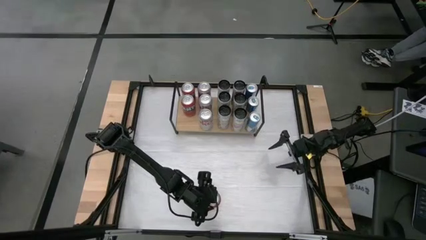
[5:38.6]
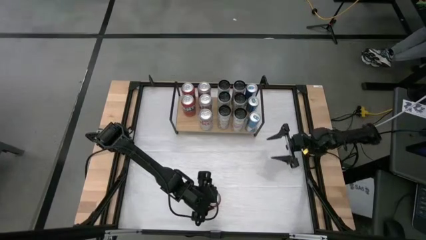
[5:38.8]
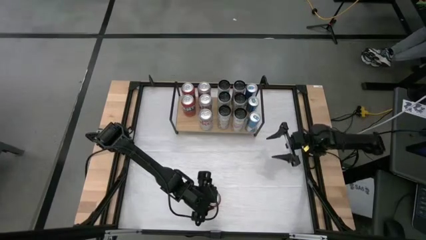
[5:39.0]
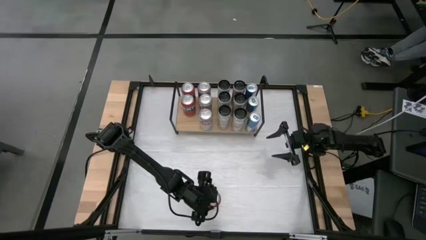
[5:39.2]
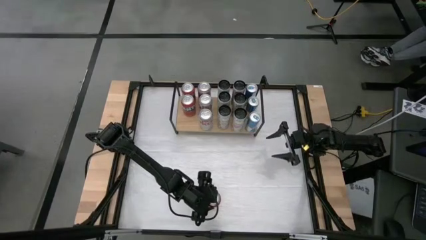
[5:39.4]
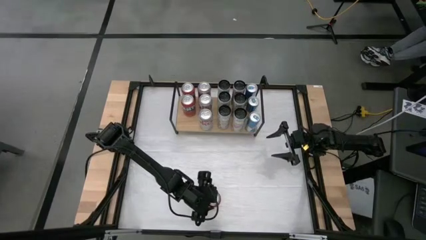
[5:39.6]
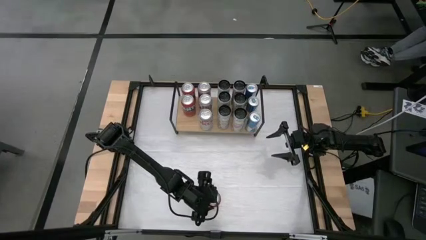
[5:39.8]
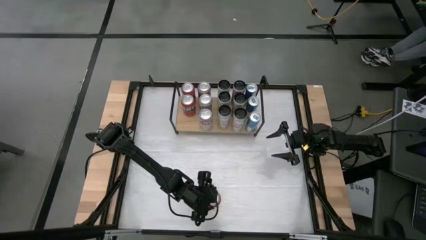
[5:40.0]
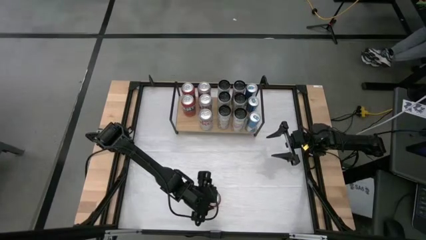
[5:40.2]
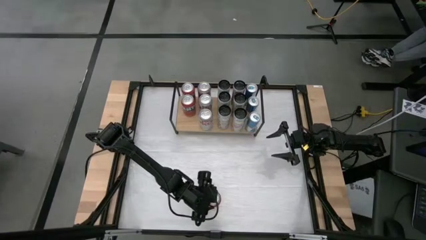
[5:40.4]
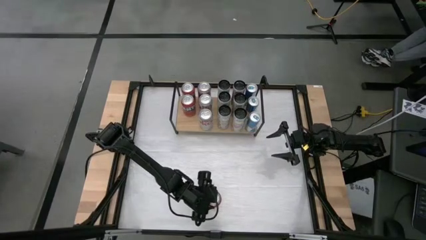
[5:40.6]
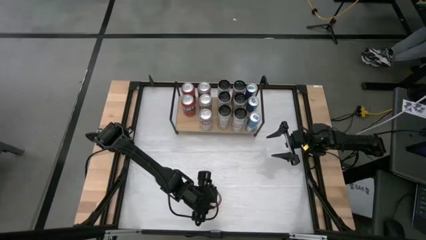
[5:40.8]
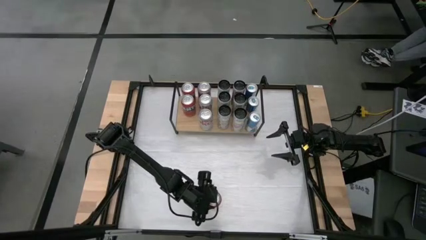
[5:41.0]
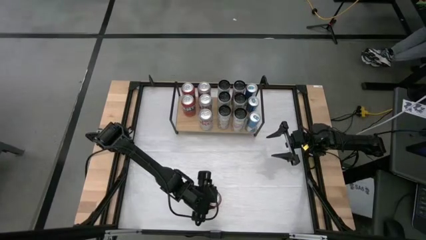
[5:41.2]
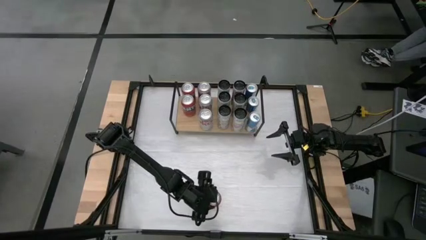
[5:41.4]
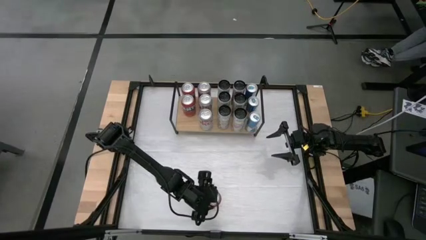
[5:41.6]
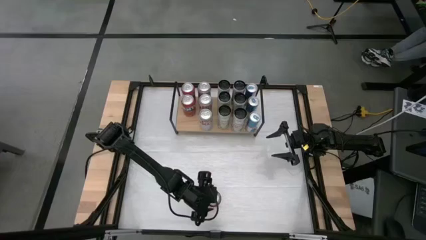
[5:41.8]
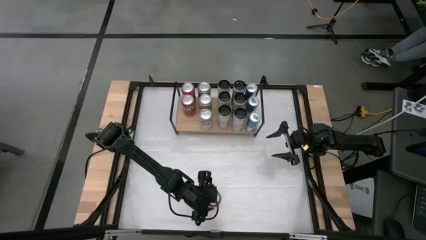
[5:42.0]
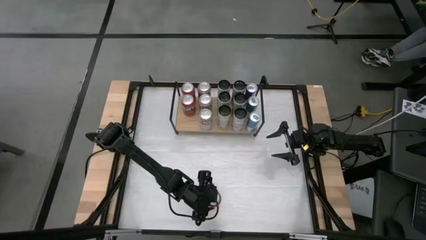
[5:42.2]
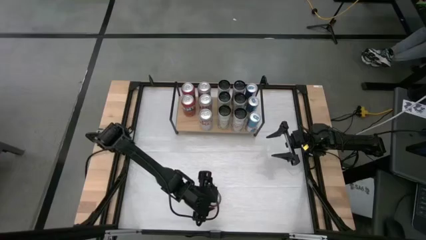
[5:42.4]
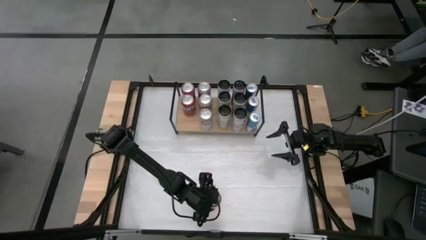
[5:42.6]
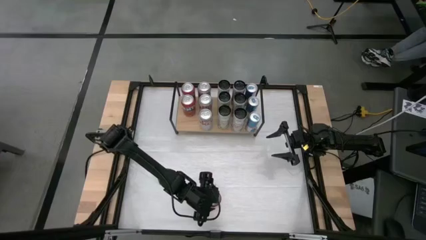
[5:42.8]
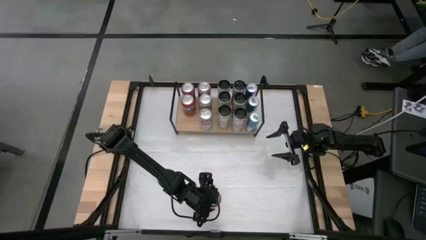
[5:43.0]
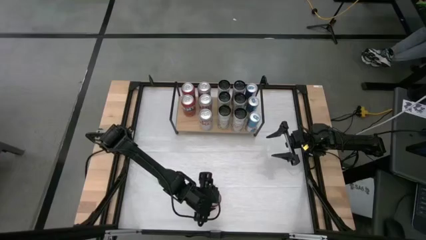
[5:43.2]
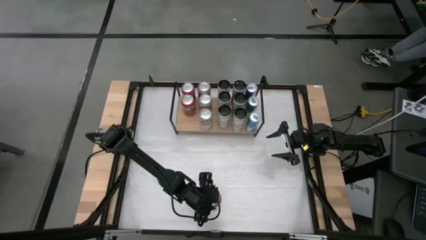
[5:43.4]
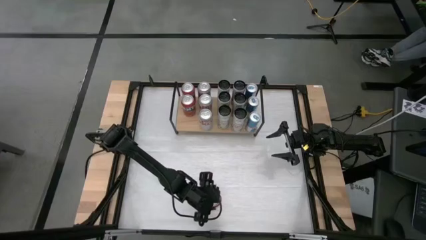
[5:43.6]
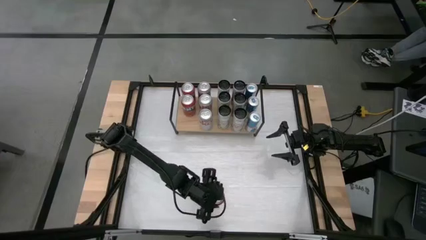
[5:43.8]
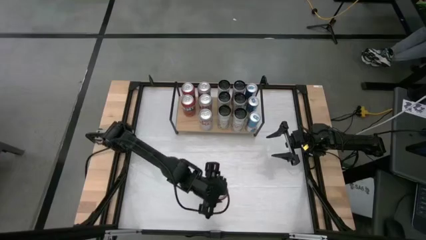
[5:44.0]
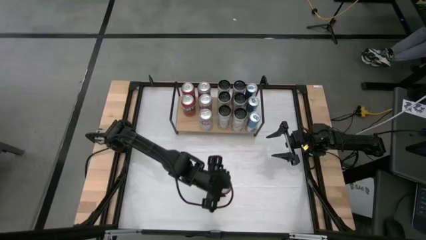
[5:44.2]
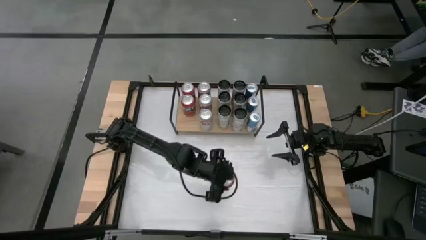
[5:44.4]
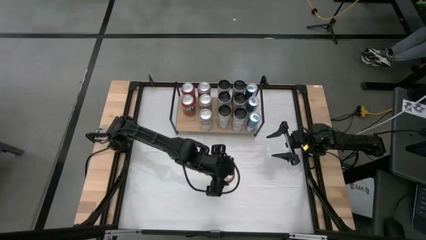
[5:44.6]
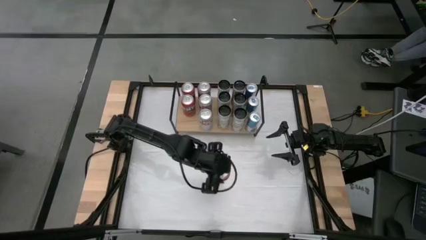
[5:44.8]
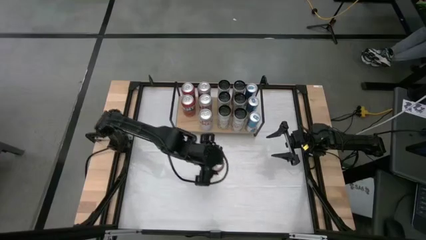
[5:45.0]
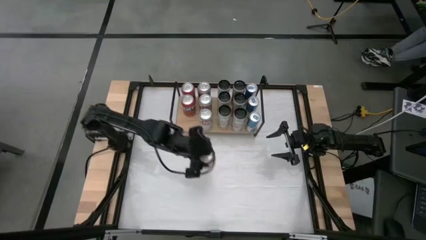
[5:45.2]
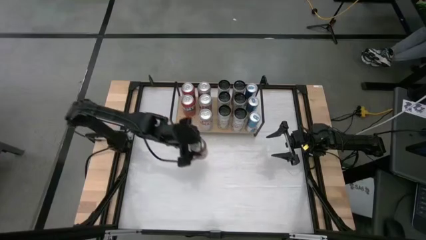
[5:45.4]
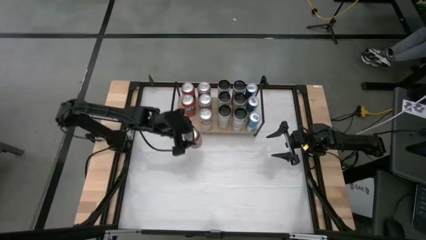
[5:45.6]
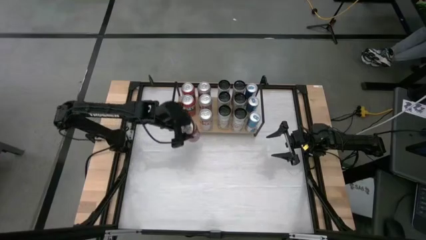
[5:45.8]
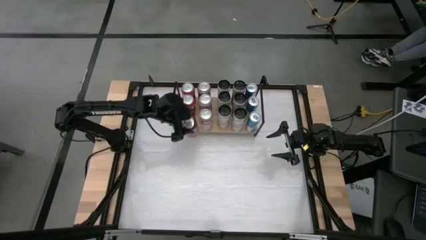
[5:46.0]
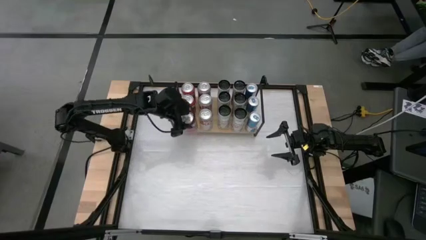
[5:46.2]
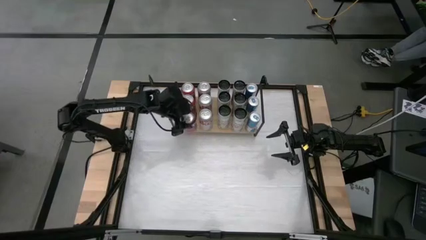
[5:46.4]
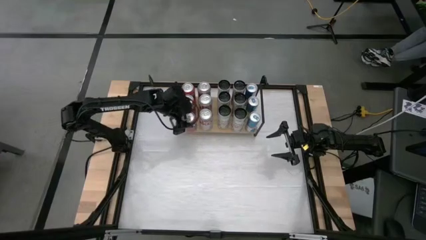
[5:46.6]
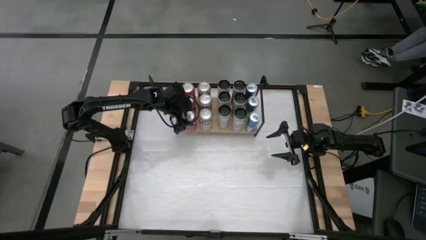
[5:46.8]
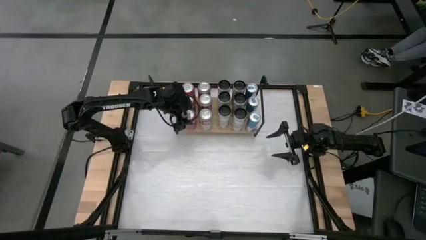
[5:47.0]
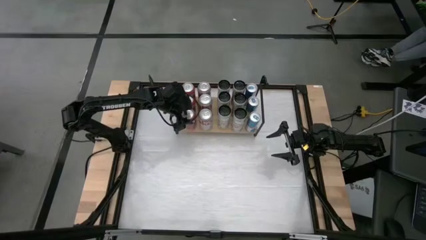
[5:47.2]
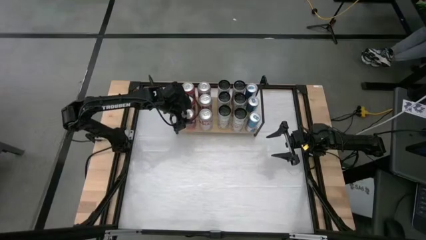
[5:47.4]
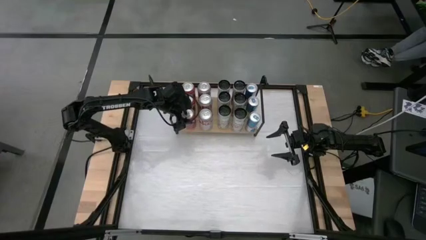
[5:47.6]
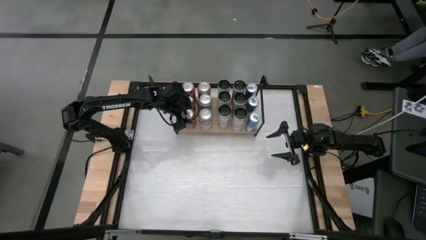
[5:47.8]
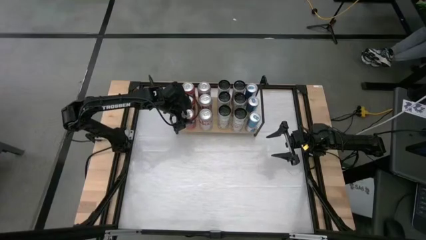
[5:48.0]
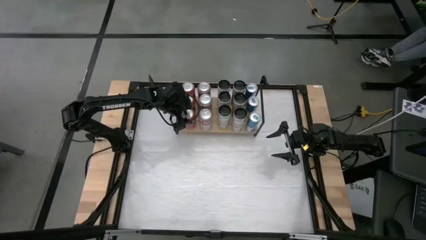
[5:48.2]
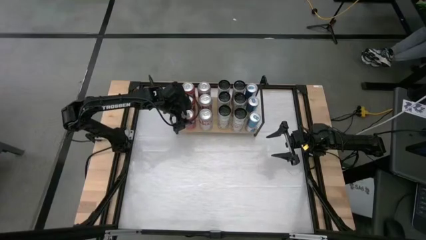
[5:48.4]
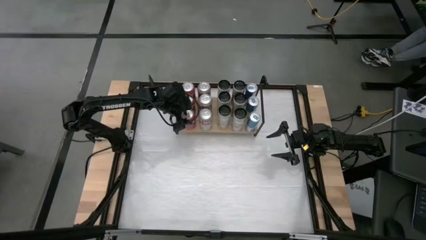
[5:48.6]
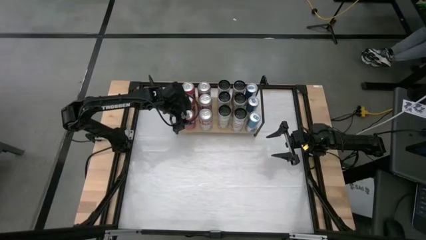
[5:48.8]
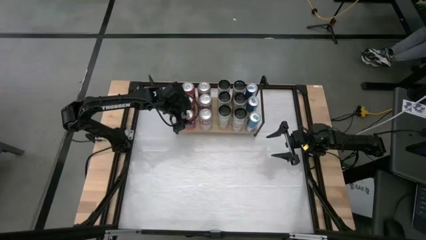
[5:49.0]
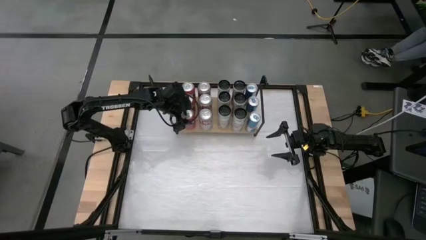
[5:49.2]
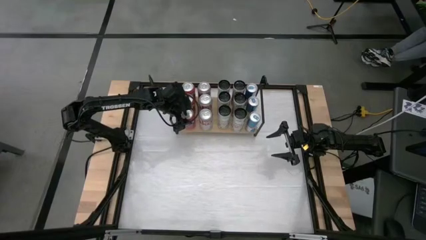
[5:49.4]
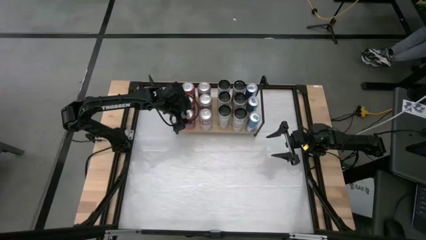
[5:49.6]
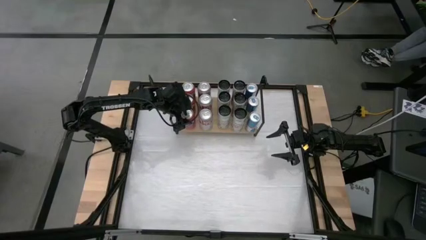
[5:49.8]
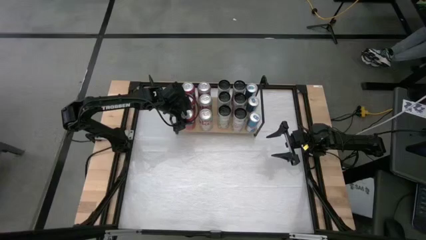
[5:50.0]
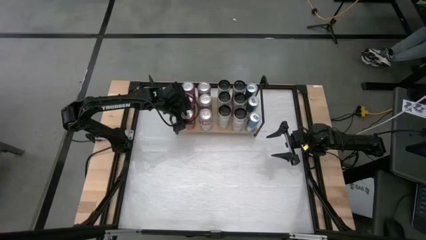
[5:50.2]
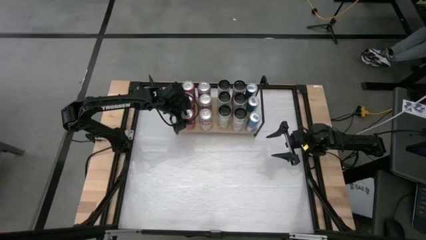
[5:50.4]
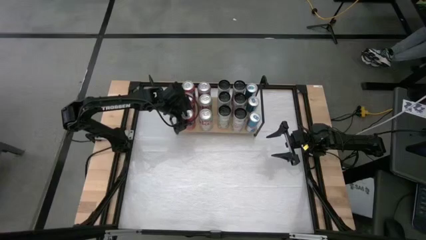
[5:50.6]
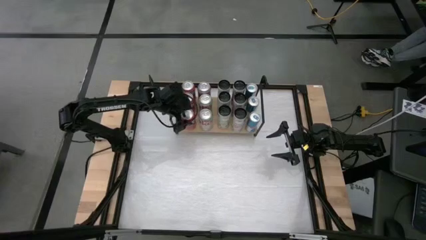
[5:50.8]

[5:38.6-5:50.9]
Task: Place canned beverage on shelf
Put the red soda can onto the shelf aligned with the other red soda cans

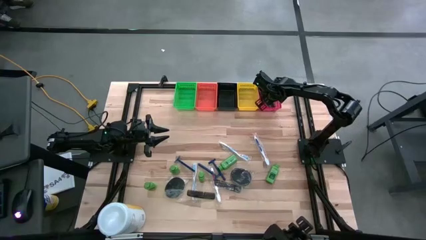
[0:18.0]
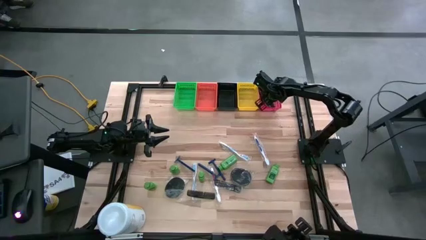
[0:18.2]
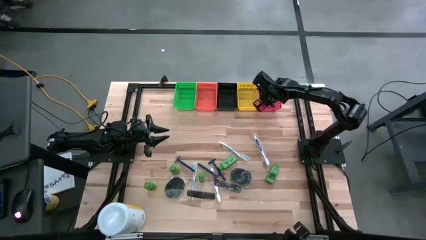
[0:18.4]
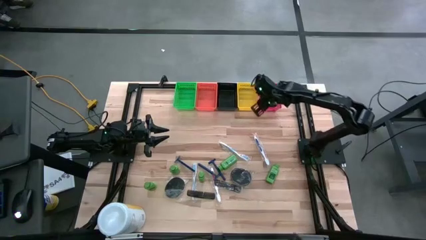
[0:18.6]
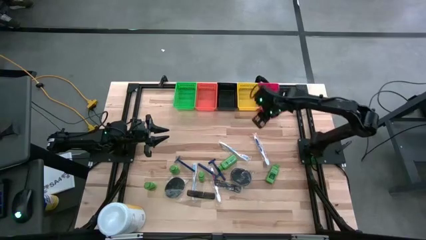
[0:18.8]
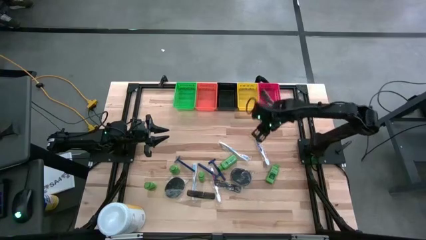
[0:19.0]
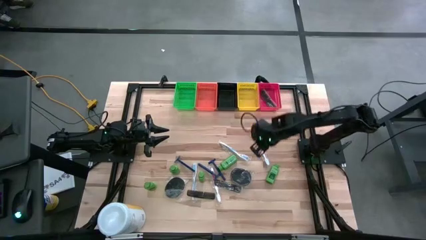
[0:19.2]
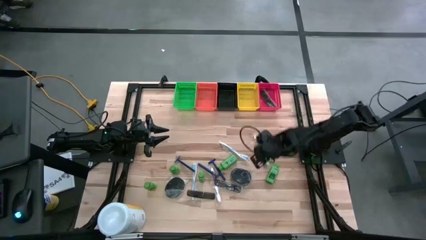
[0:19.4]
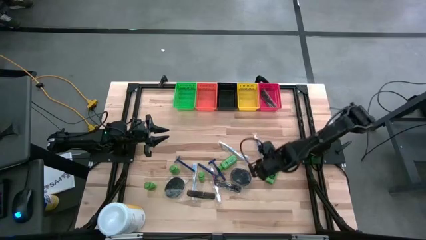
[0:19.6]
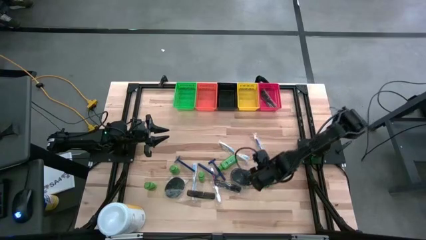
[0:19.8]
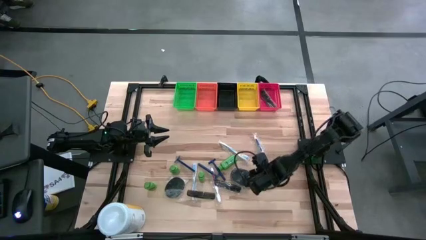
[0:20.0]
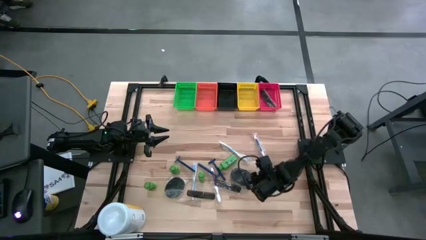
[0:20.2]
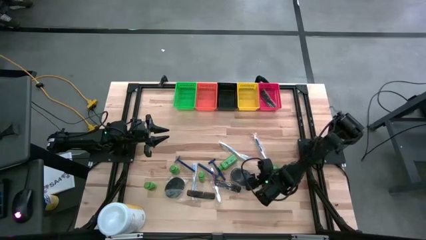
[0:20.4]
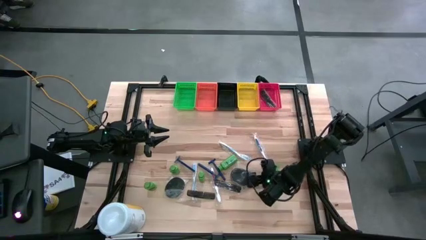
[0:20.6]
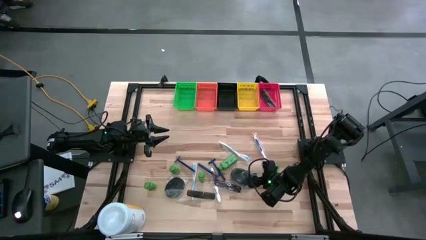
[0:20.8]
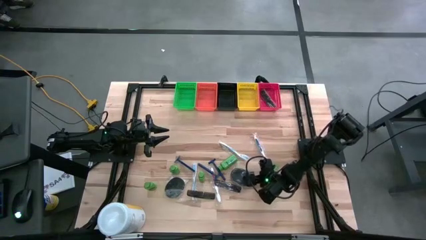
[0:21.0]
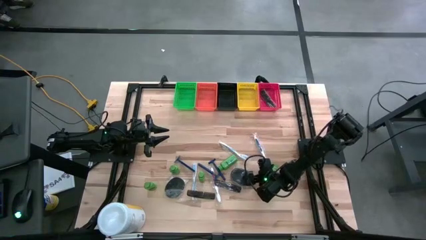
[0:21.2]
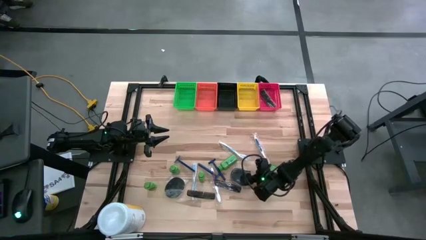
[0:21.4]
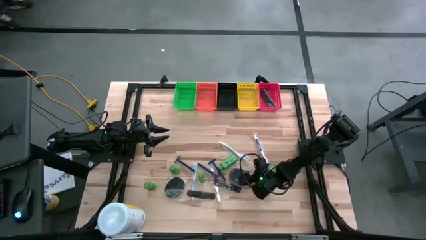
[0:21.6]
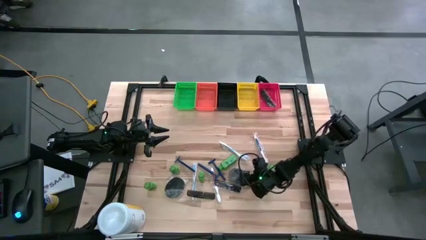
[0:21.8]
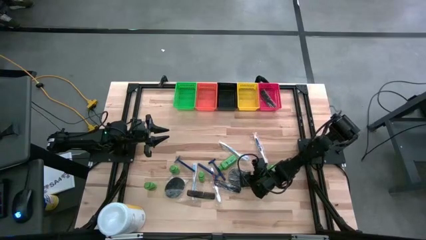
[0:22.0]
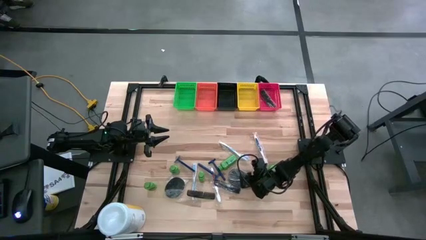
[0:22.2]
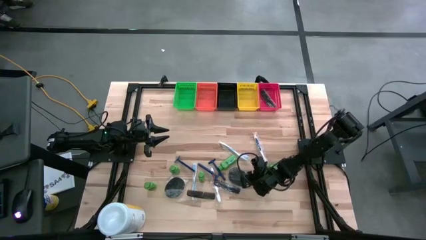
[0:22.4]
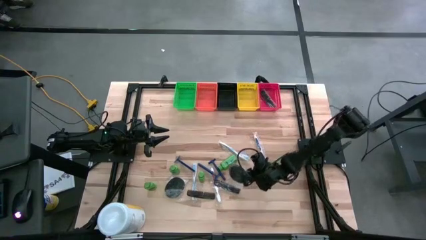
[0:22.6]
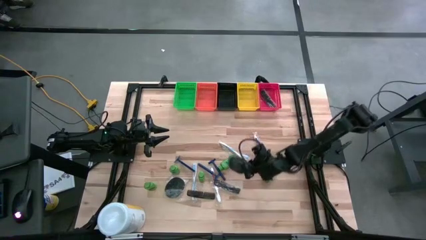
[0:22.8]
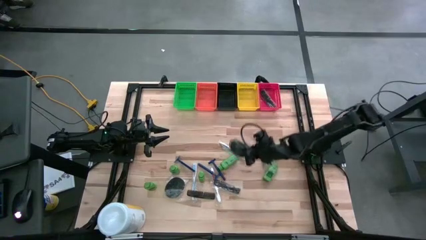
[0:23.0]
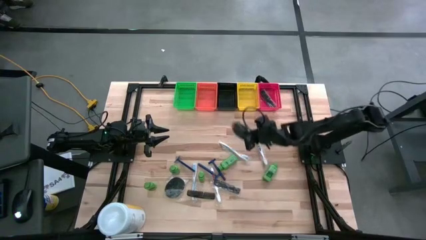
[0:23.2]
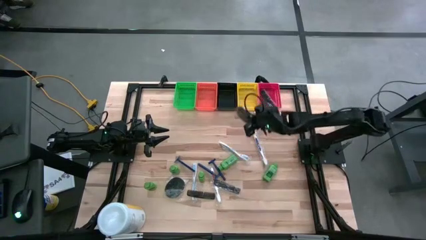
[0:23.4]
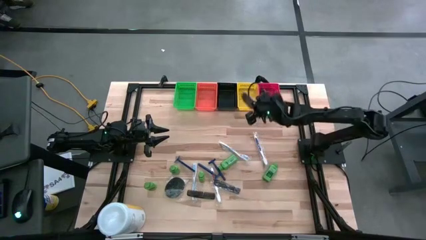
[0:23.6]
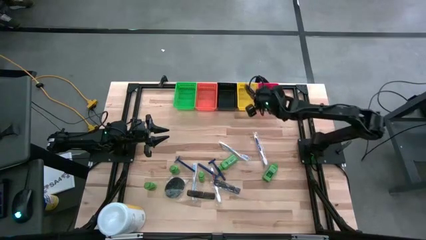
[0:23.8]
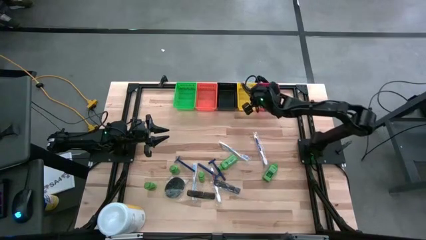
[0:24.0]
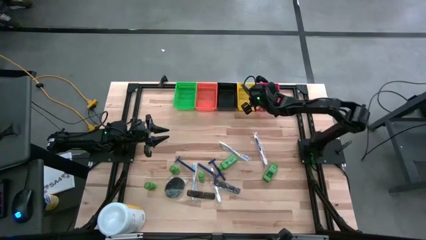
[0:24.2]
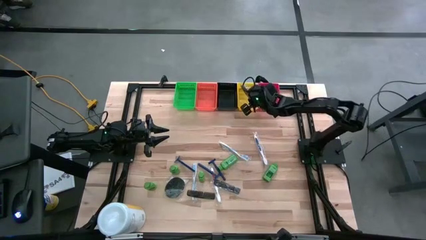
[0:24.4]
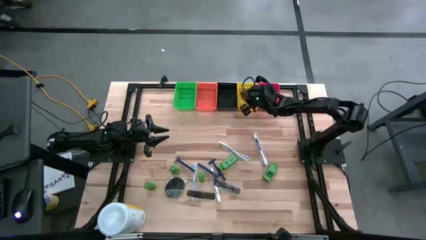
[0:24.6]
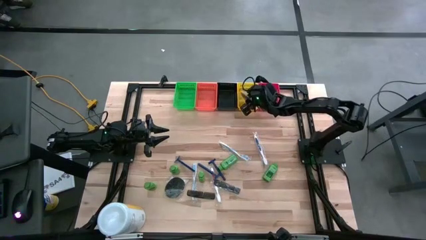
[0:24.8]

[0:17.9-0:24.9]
Task: Pick & Place Travel size toiletries
Put the black hairbrush into the yellow bin
